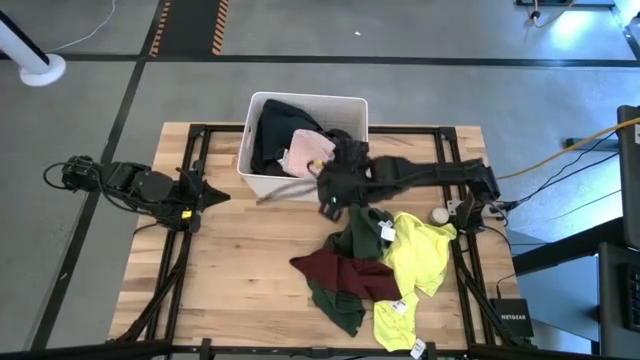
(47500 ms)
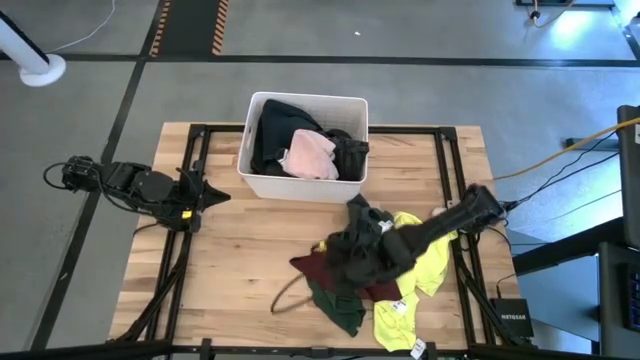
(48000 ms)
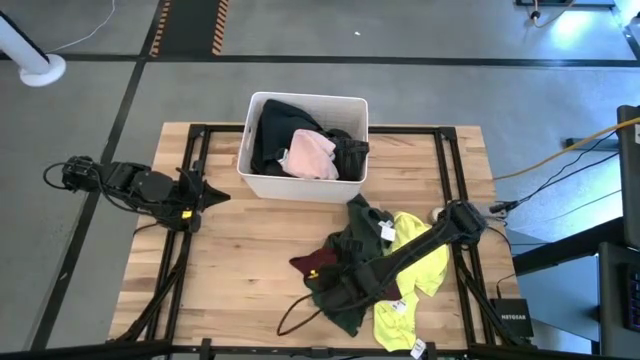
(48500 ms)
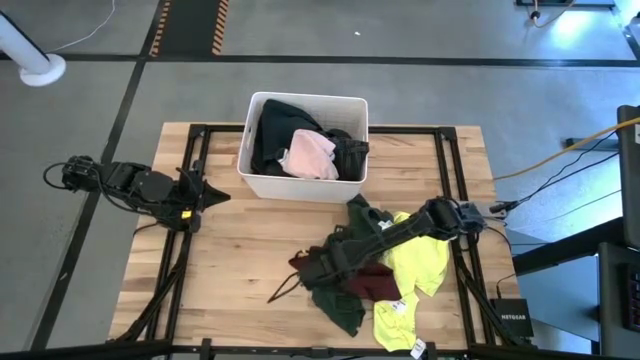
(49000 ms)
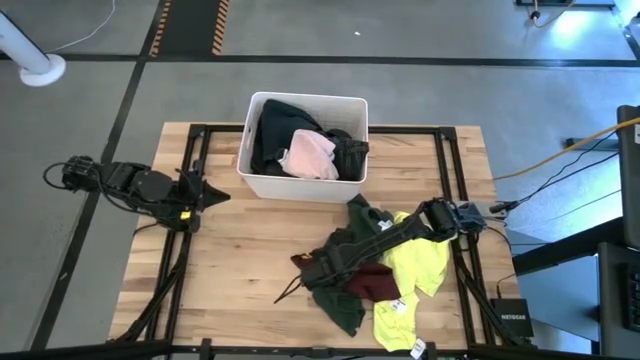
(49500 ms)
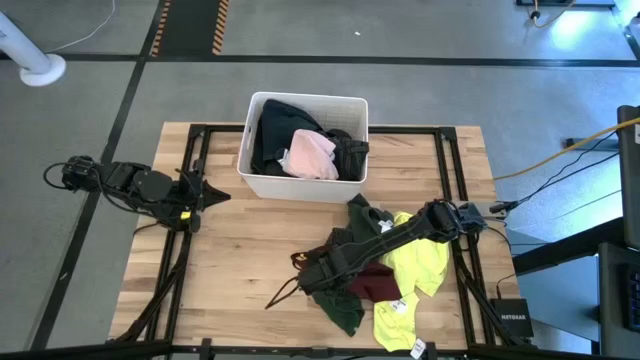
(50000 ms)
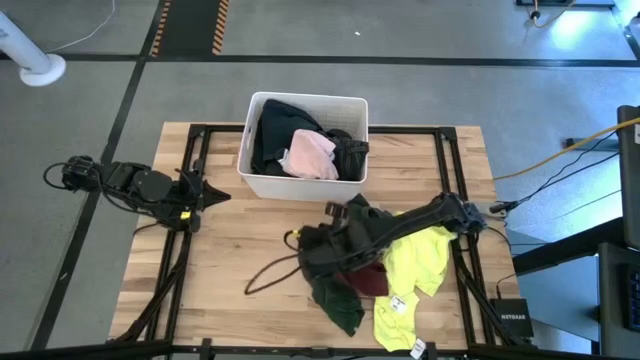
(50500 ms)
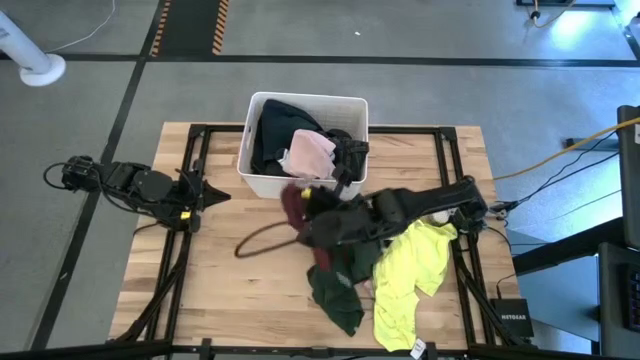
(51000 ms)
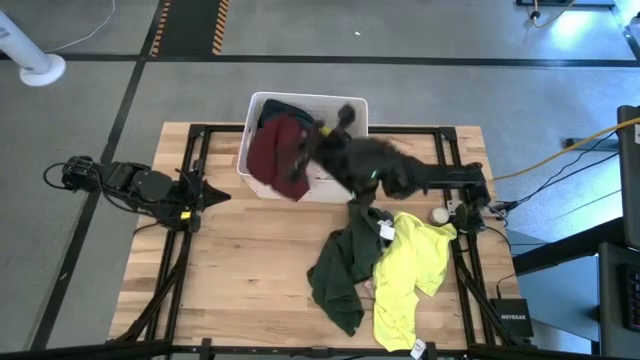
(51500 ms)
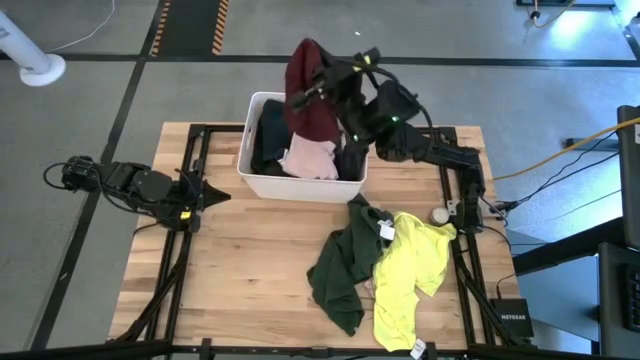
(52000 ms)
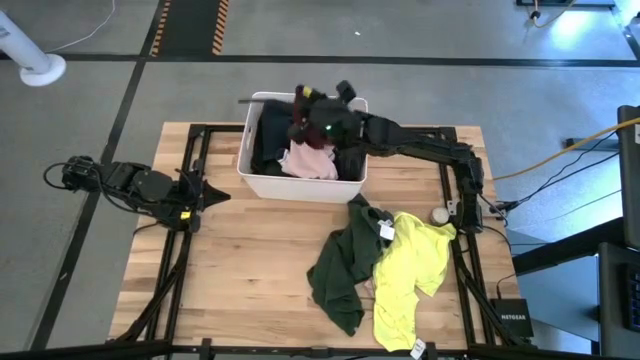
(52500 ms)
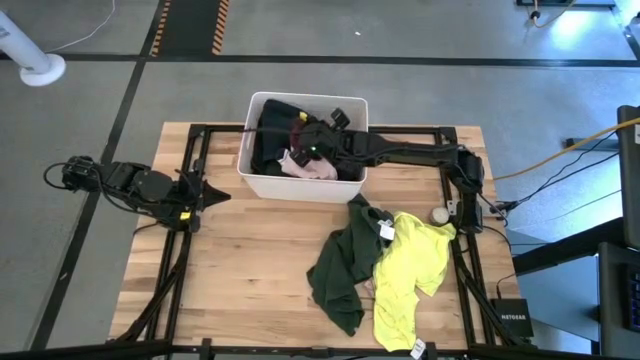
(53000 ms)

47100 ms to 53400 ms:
Task: Sort clothes
Put the maroon underwear into the white laundry bin

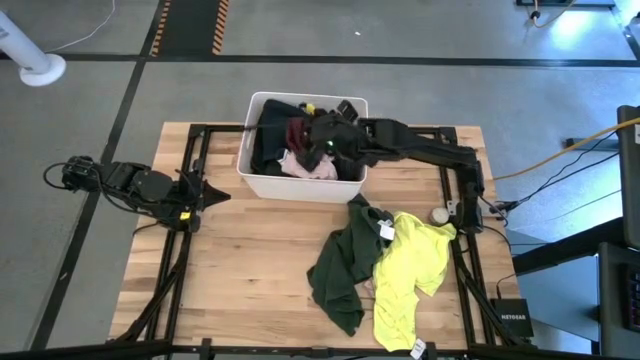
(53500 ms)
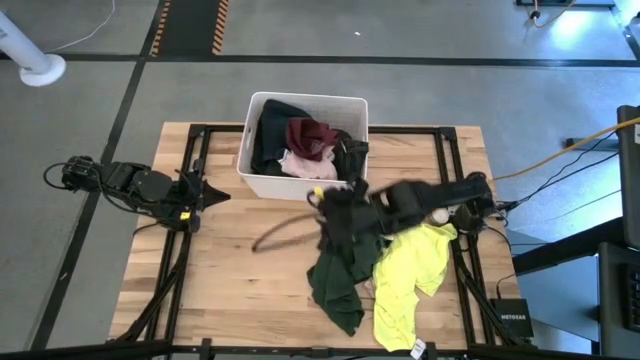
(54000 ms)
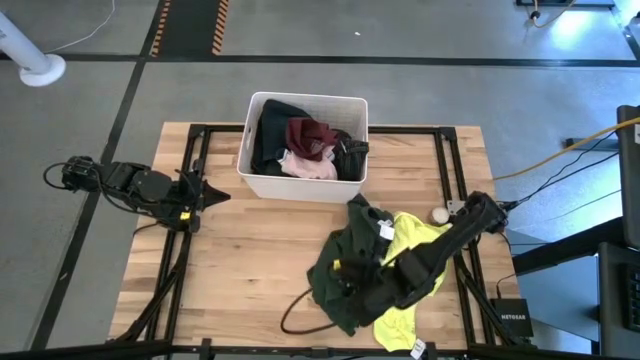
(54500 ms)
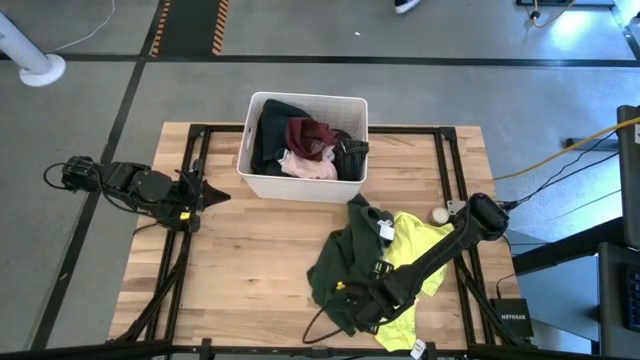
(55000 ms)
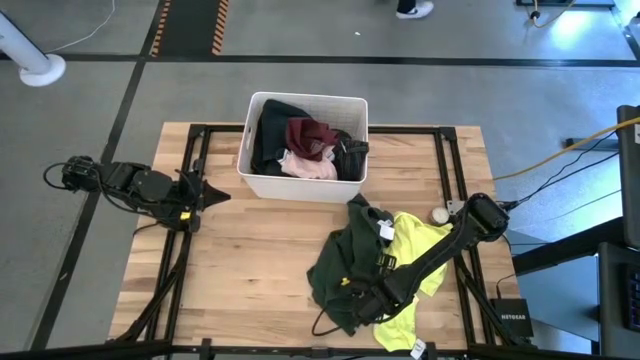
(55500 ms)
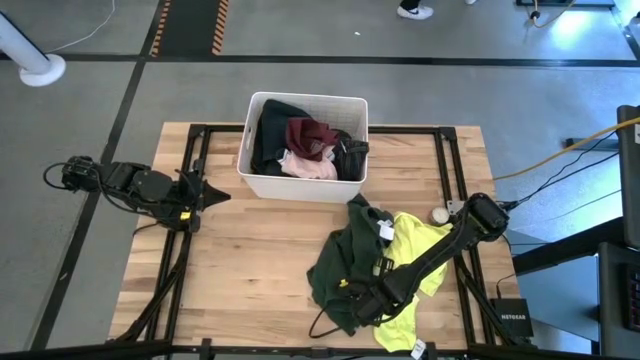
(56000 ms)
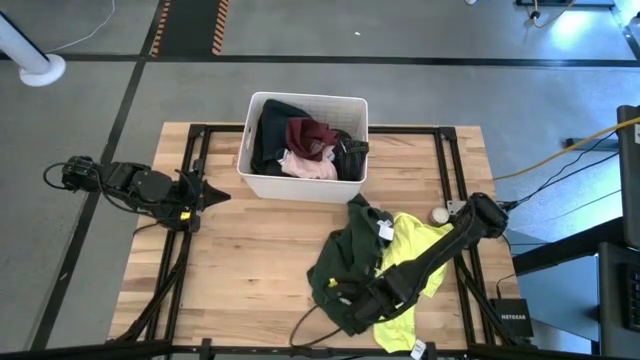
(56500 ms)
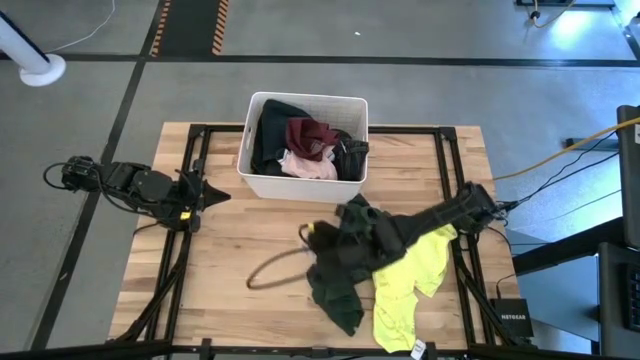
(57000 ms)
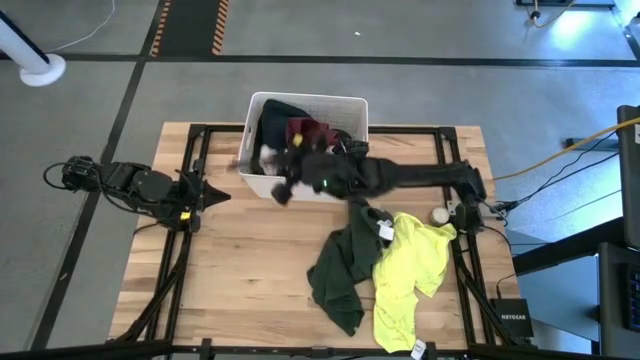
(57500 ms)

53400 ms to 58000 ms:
Put the top white socks into the white laundry bin

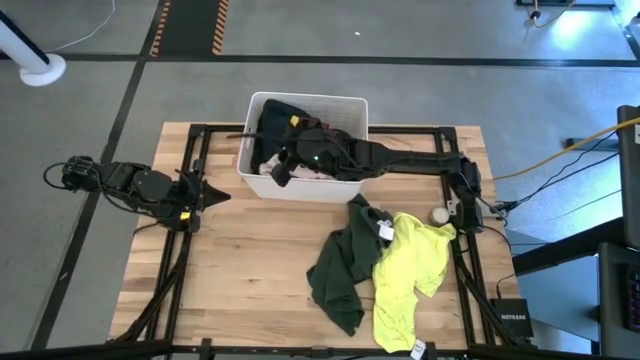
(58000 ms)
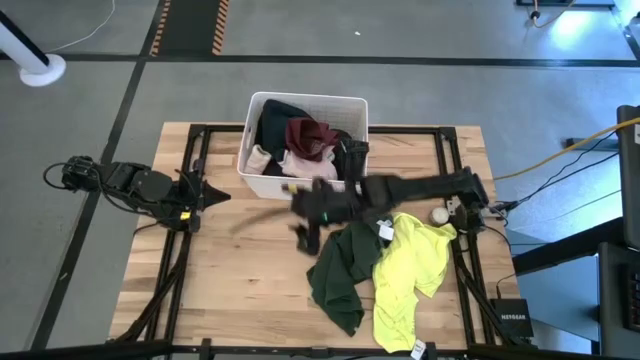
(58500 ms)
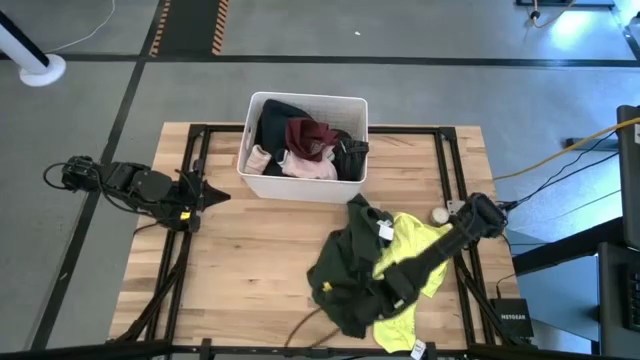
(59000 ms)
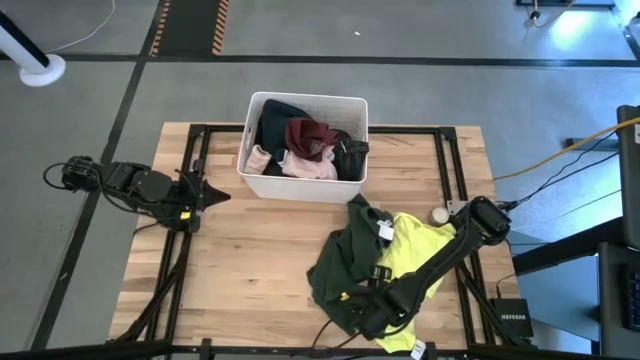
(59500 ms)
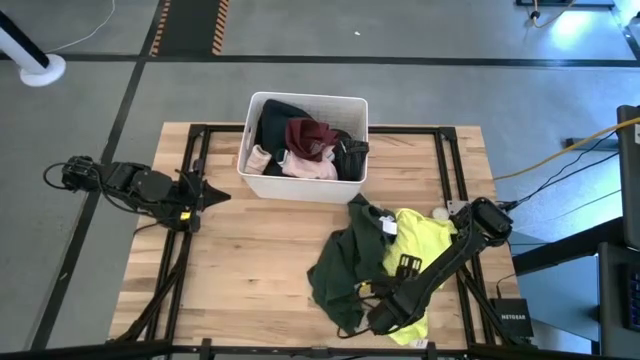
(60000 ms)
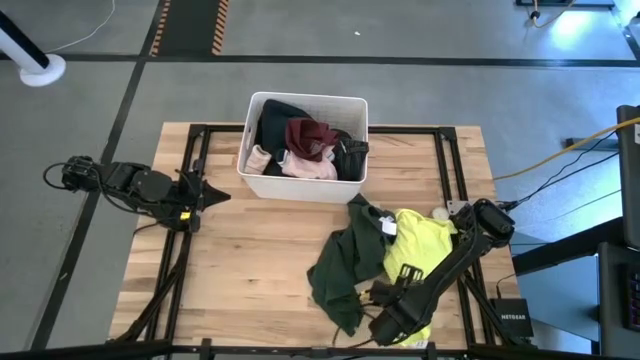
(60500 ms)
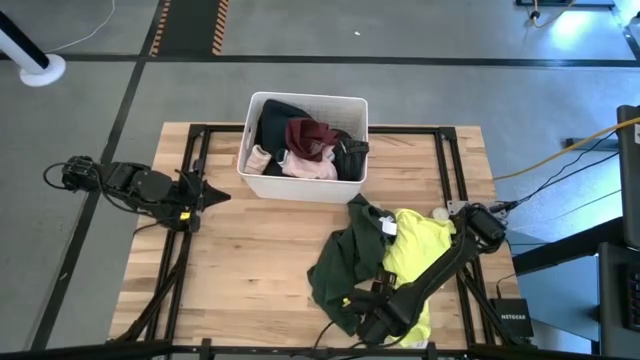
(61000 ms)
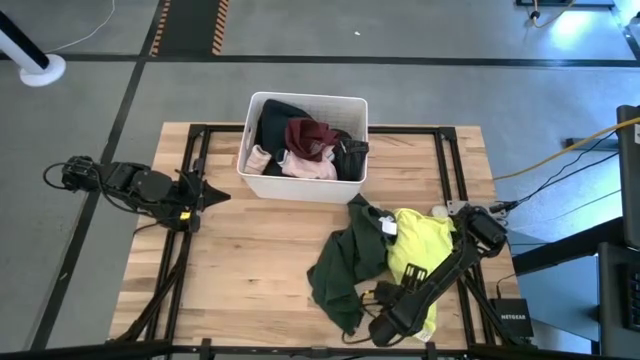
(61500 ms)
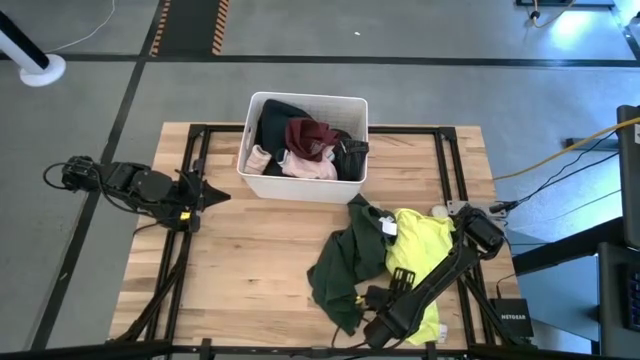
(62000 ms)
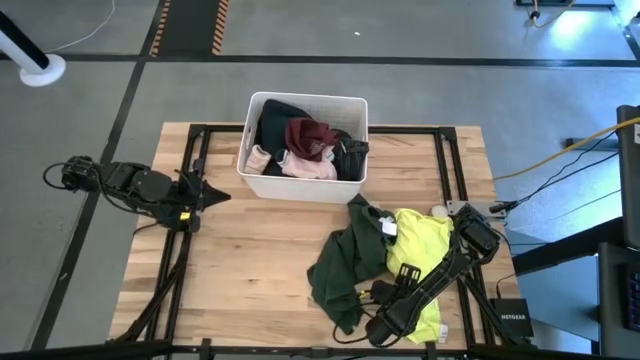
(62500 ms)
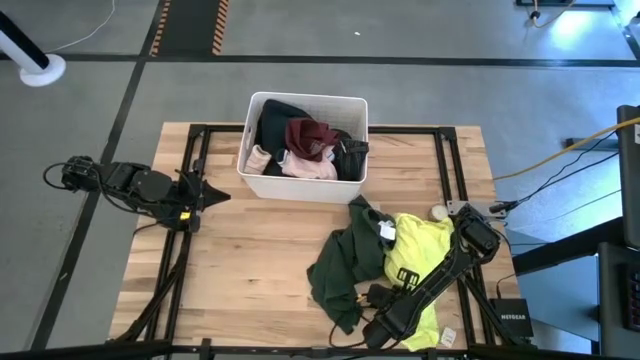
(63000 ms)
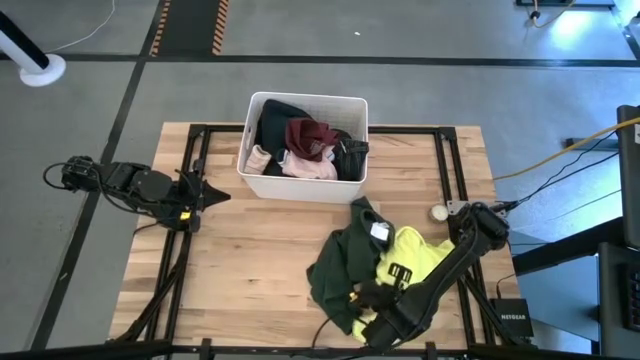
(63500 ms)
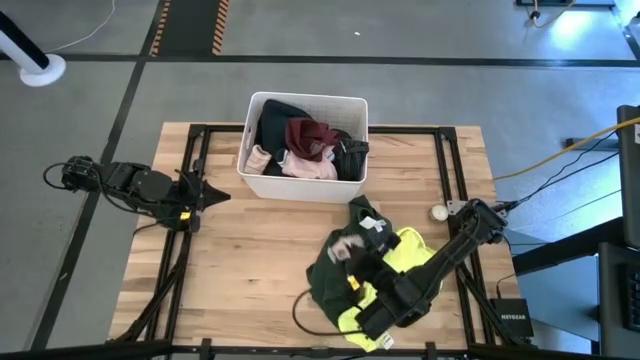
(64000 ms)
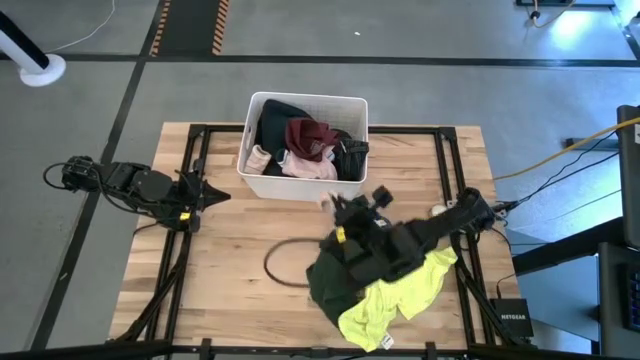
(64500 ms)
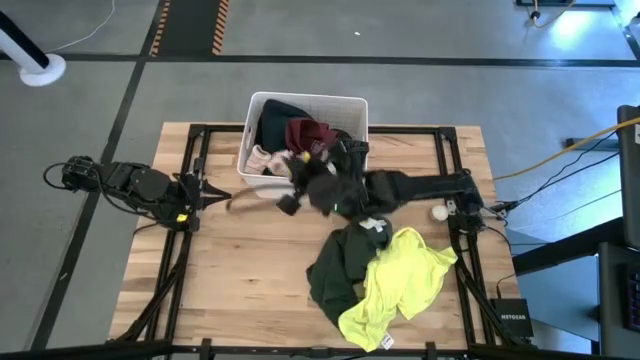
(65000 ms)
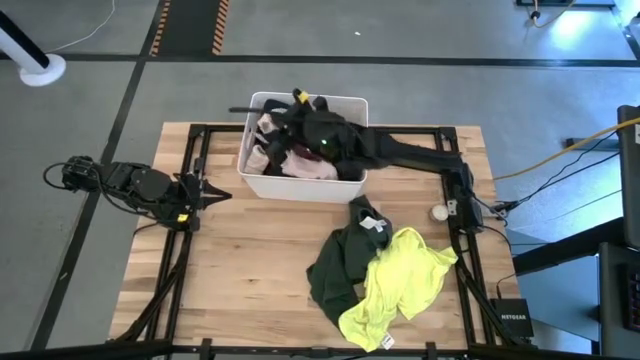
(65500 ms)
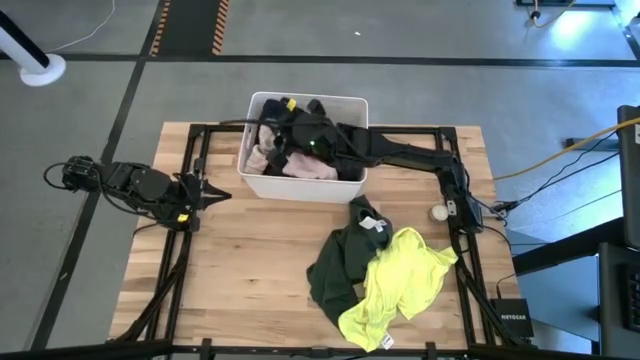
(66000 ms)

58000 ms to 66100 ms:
Put the white socks into the white laundry bin

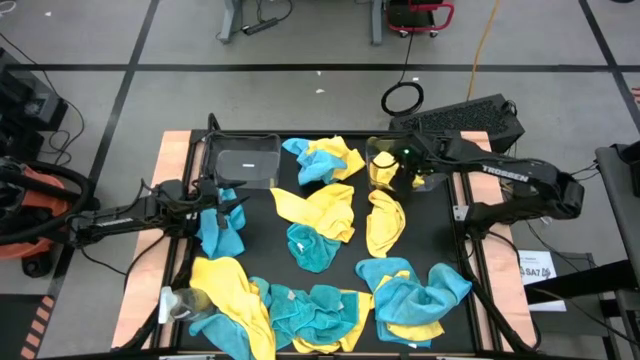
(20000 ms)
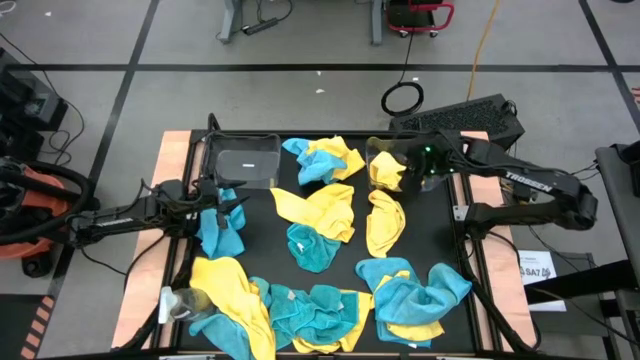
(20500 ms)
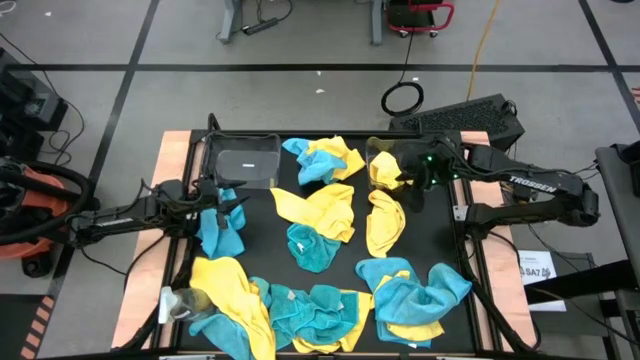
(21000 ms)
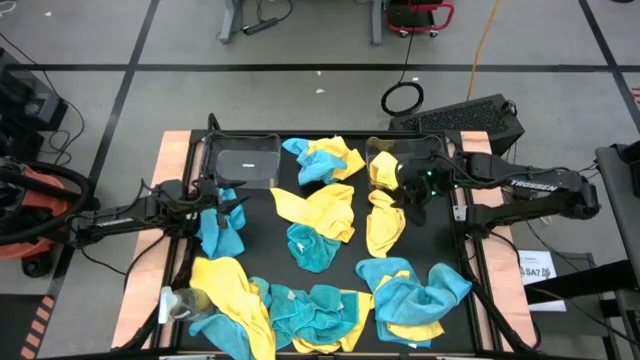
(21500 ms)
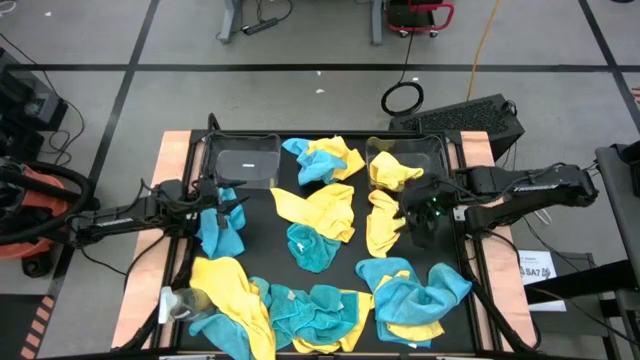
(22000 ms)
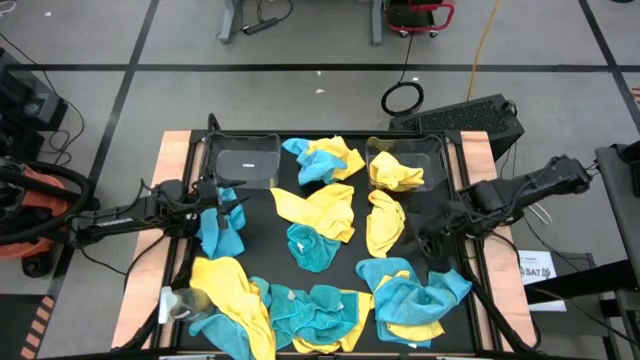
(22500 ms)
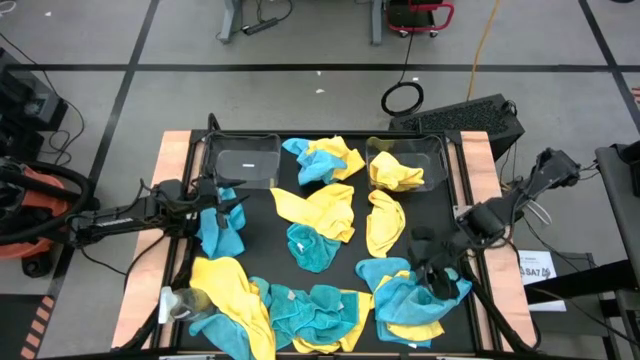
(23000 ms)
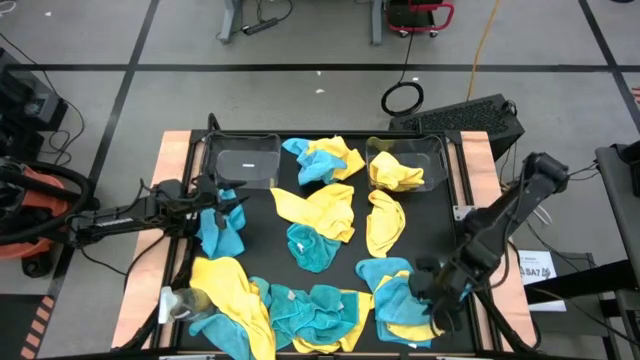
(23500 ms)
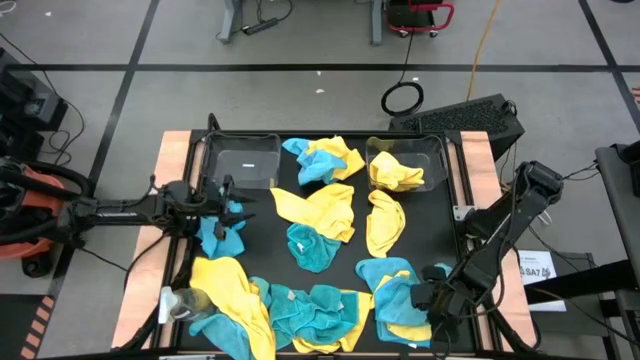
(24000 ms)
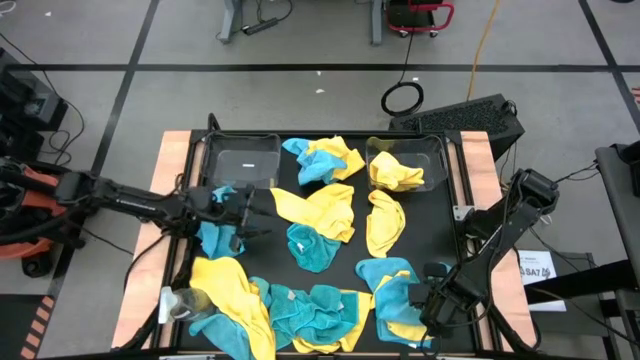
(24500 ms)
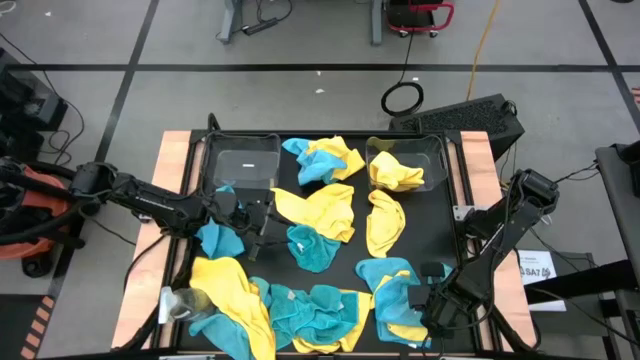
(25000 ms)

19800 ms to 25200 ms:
Task: Sort microfiber towel by color & place in baskets
Put the blue microfiber cloth into the left transparent bin
